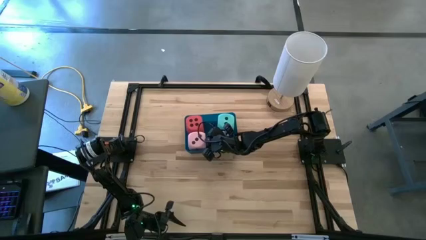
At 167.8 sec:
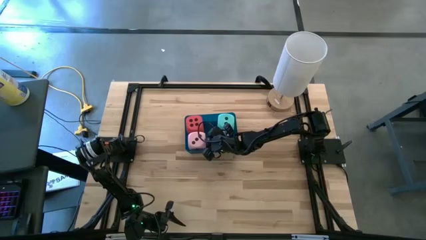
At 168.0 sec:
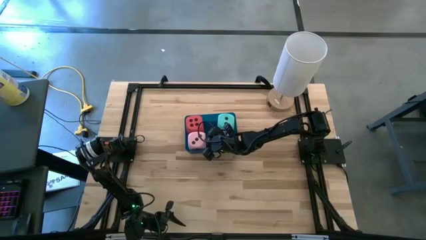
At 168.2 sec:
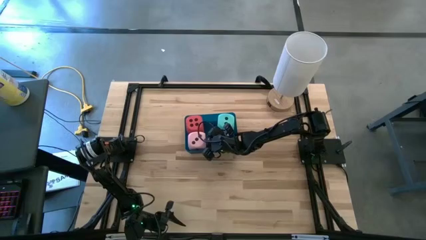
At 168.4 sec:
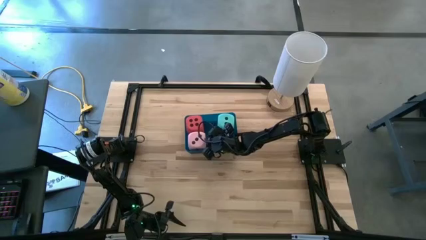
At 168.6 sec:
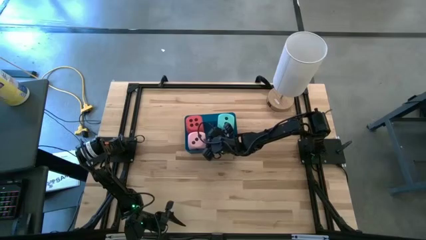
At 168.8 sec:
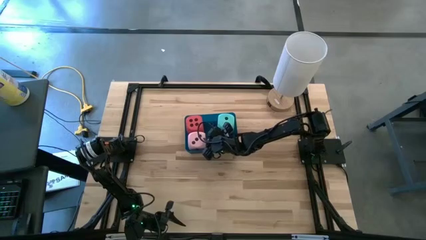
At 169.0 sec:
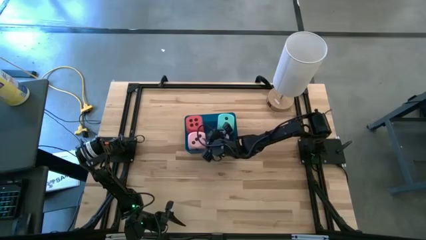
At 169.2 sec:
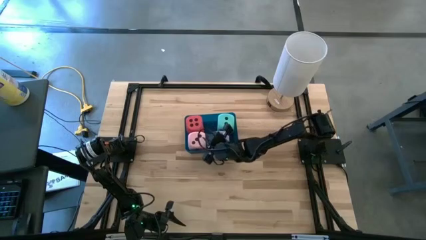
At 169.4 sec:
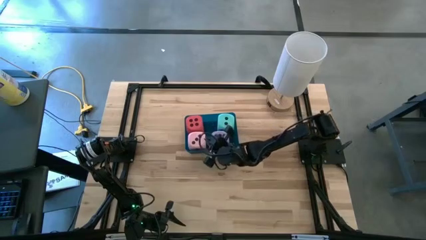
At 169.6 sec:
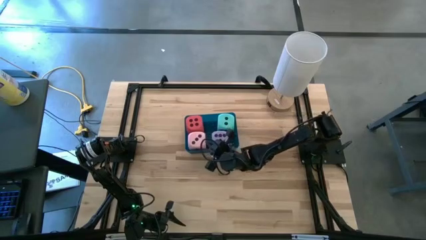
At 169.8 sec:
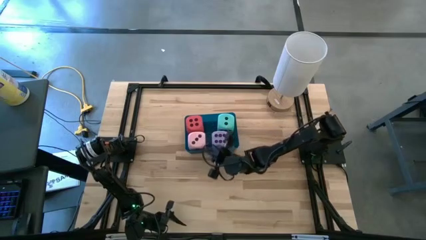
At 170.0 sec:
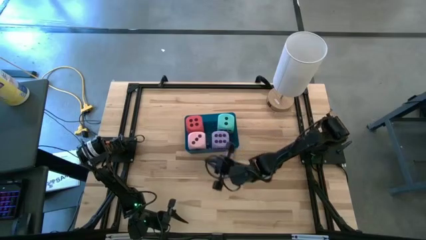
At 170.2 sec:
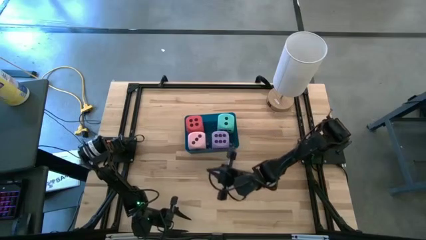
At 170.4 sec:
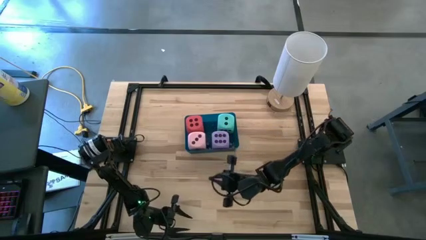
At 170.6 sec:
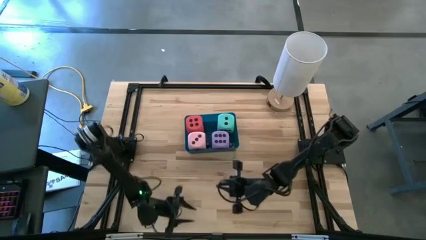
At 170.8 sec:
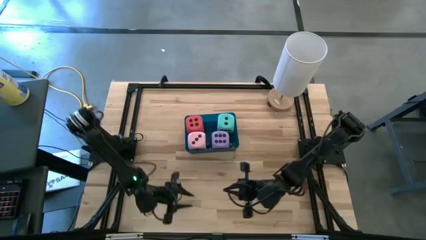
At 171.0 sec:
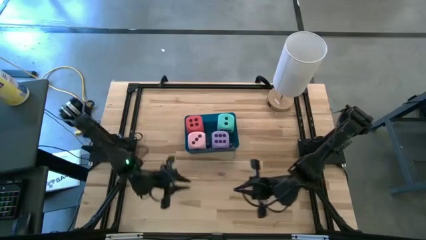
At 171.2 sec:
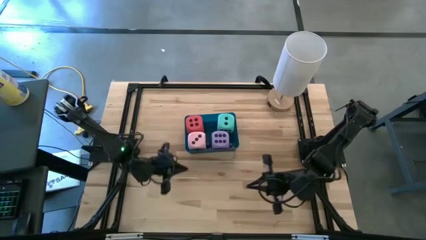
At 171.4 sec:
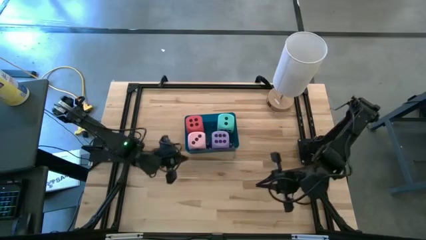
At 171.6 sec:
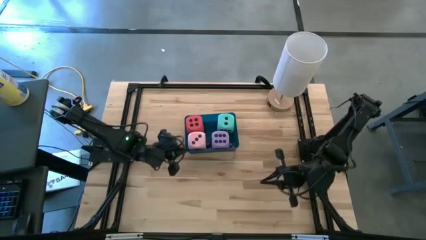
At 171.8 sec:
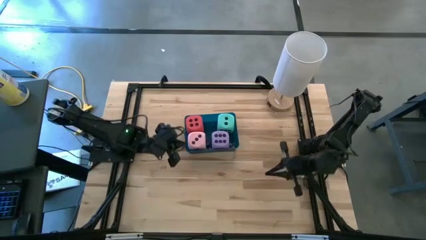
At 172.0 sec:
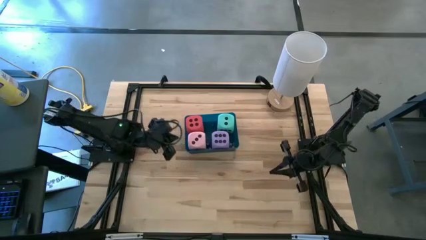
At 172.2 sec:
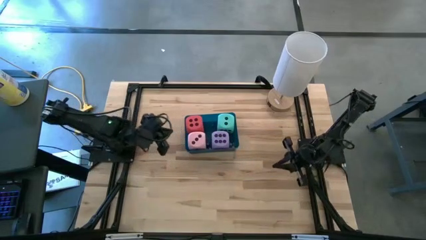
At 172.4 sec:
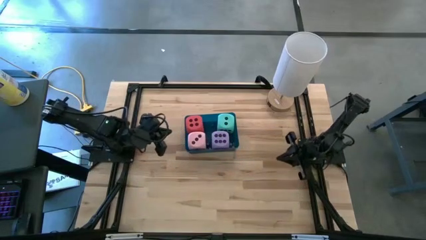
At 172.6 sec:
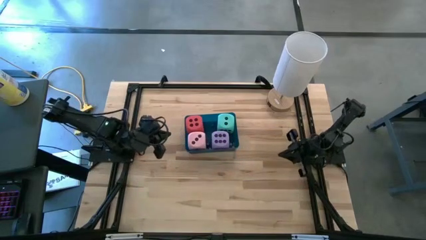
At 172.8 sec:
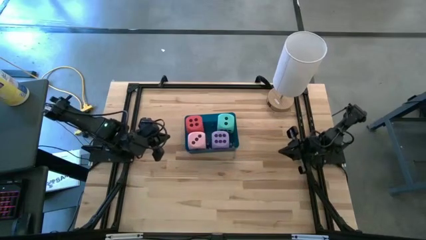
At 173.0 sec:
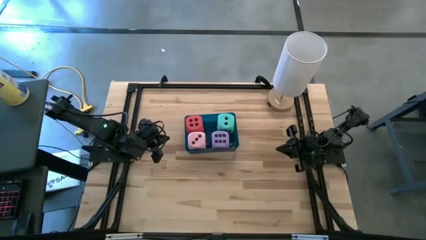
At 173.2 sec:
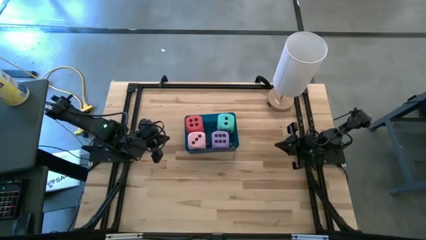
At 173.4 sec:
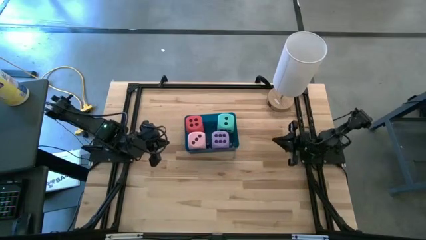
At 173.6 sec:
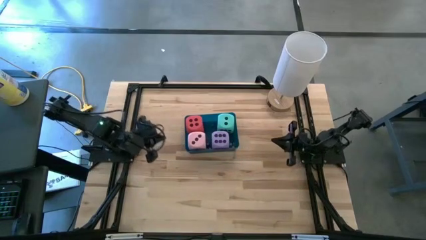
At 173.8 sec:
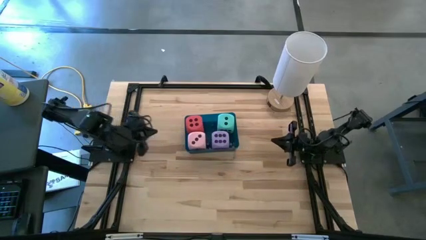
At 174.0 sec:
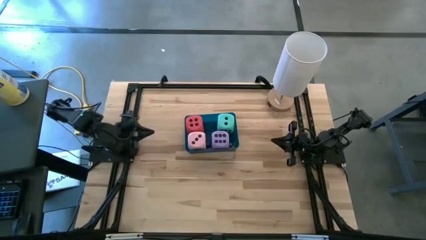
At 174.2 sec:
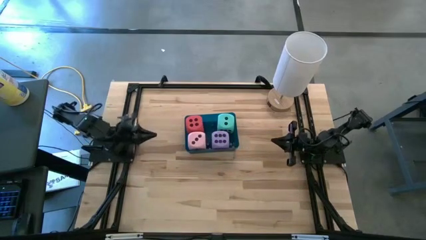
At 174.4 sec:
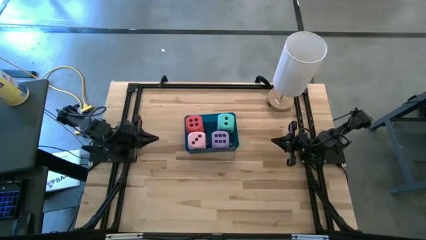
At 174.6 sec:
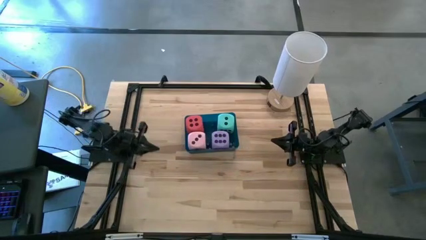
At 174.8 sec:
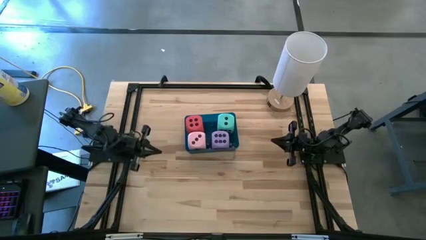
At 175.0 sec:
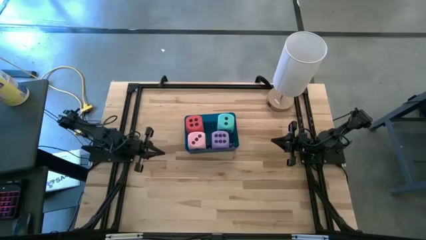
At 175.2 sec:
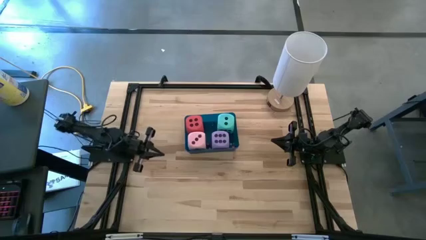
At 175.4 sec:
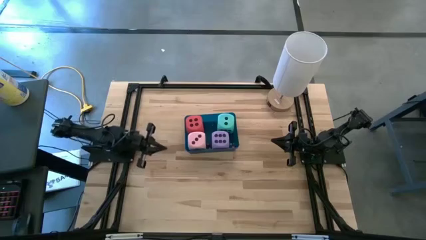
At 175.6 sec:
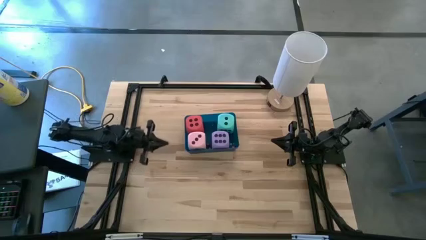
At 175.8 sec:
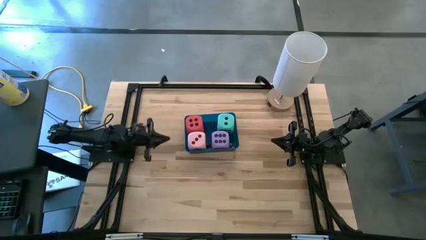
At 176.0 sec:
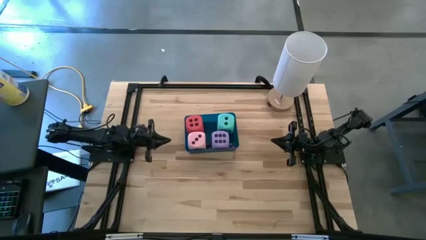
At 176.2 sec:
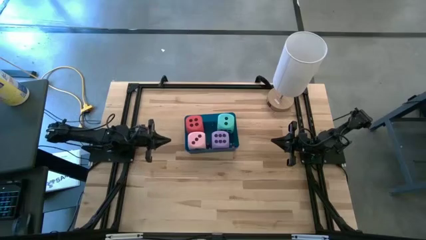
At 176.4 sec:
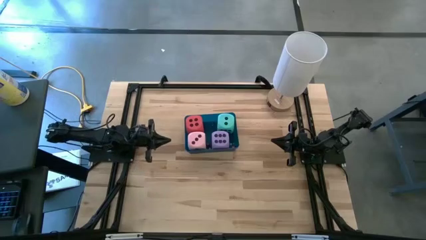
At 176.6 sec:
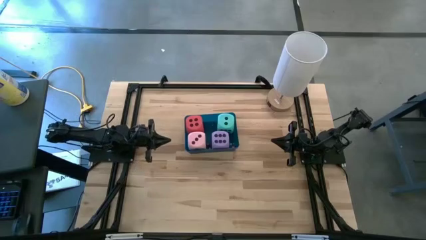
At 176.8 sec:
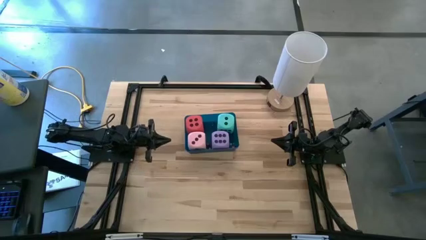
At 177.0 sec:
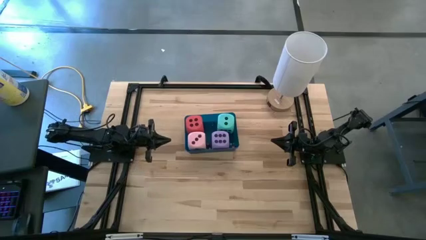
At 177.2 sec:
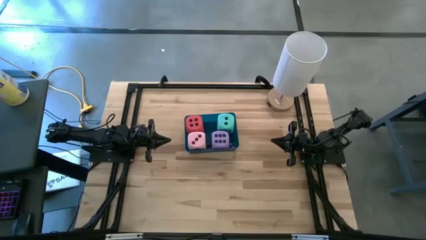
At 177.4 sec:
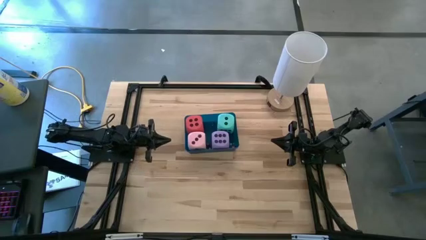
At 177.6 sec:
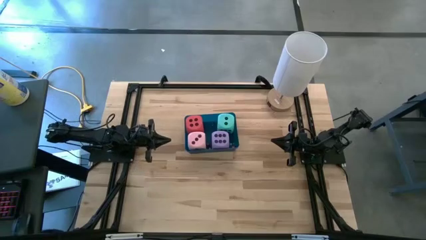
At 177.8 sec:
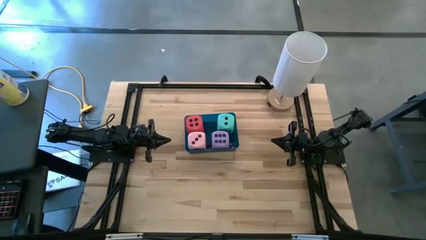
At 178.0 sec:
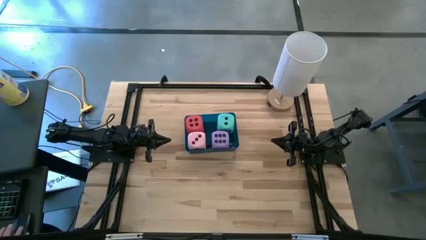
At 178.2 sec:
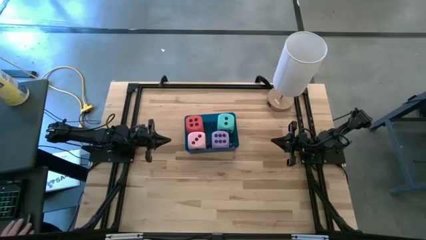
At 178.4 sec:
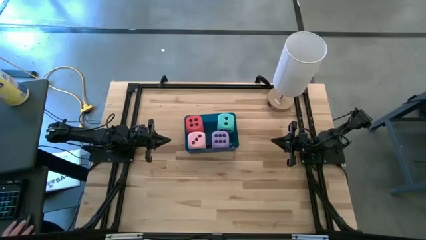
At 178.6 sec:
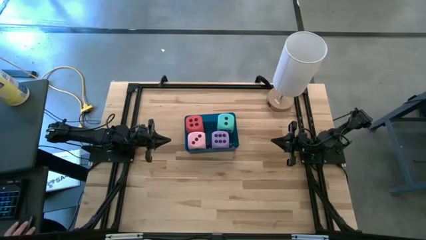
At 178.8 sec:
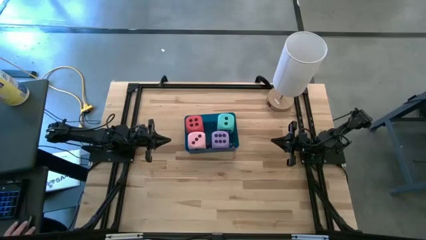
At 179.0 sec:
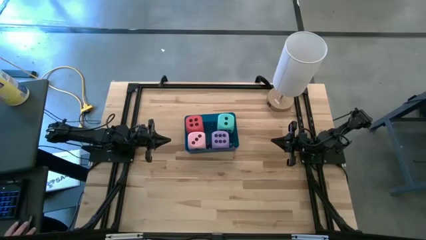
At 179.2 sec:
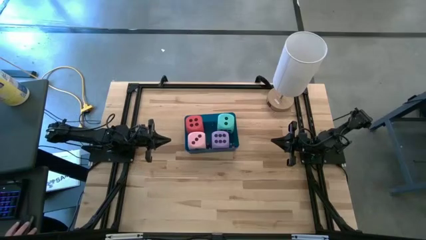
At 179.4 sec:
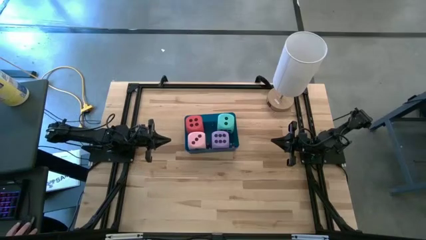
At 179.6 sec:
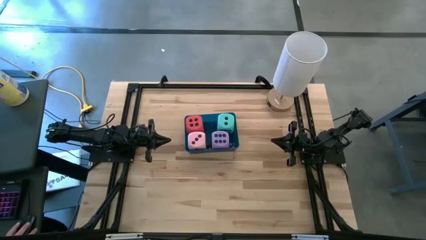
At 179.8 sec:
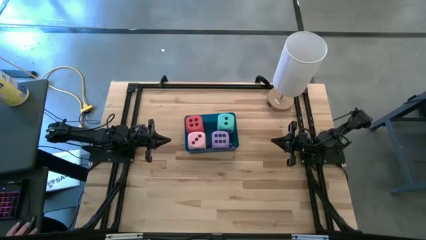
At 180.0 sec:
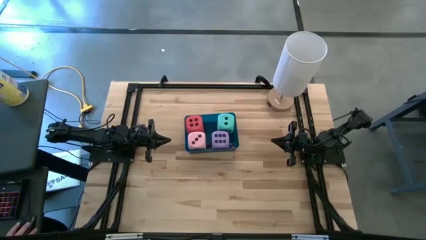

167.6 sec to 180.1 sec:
Task: Pick & Place Dice
Return to Home Position
